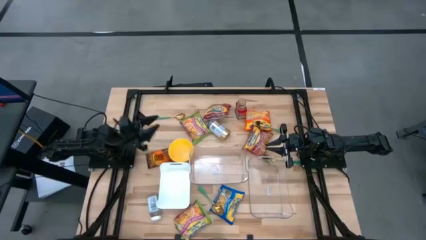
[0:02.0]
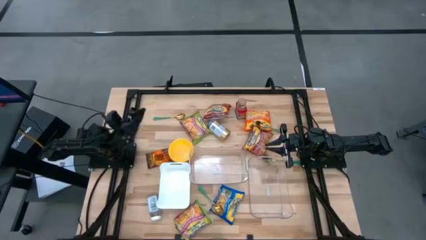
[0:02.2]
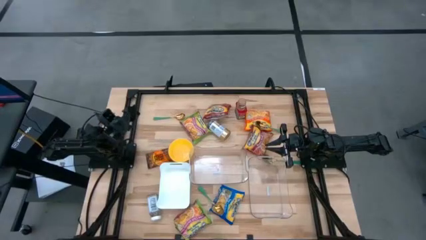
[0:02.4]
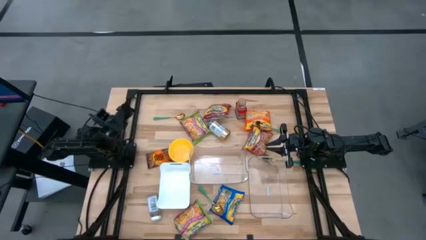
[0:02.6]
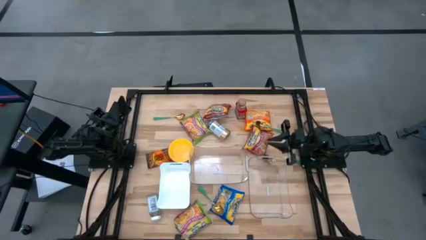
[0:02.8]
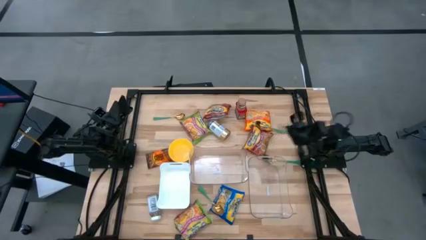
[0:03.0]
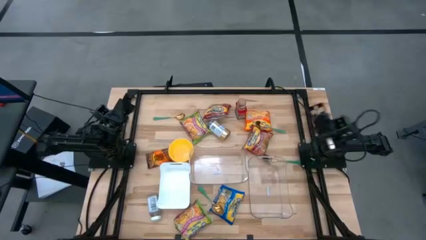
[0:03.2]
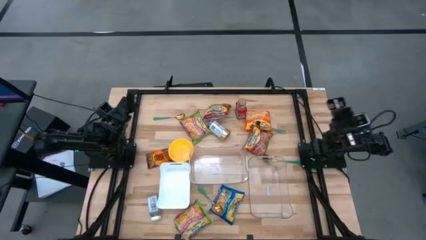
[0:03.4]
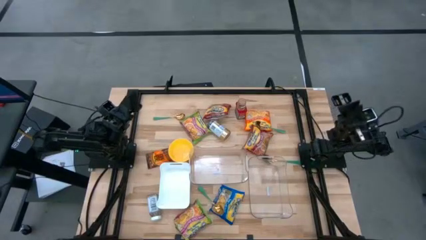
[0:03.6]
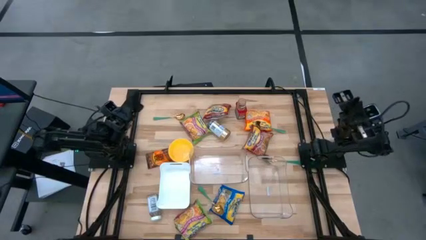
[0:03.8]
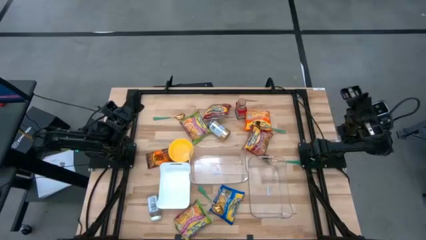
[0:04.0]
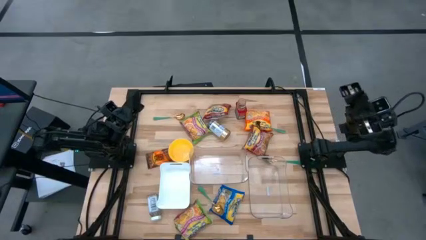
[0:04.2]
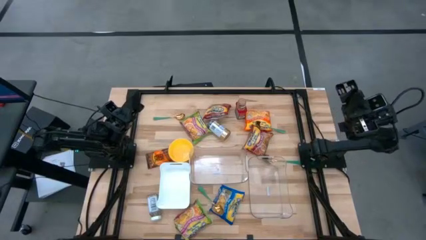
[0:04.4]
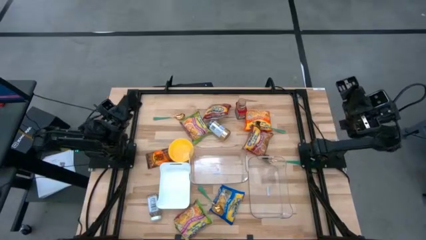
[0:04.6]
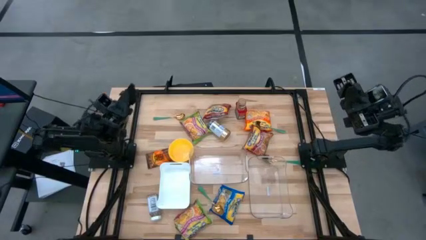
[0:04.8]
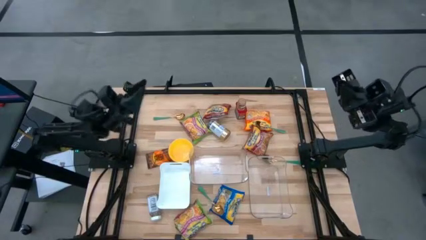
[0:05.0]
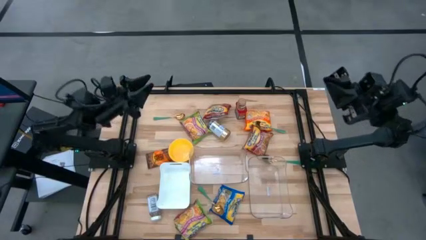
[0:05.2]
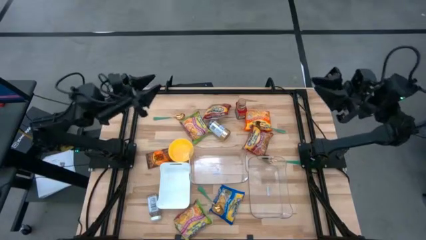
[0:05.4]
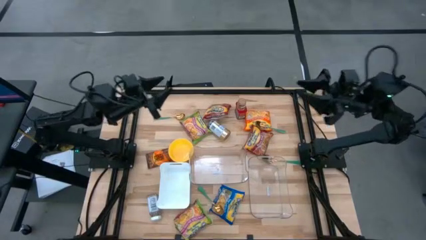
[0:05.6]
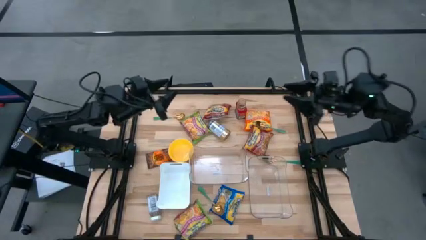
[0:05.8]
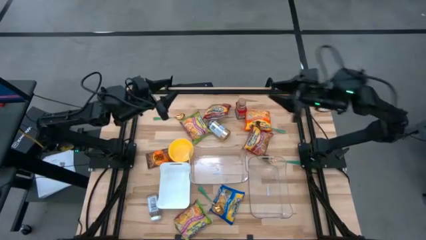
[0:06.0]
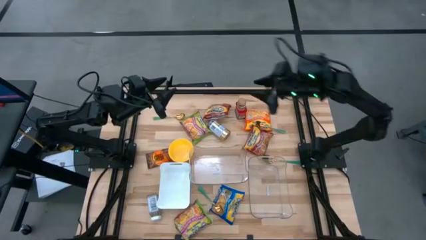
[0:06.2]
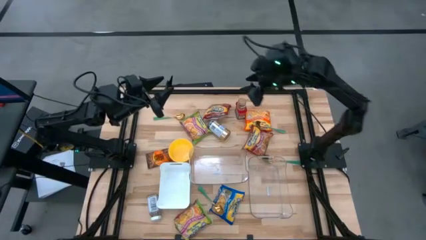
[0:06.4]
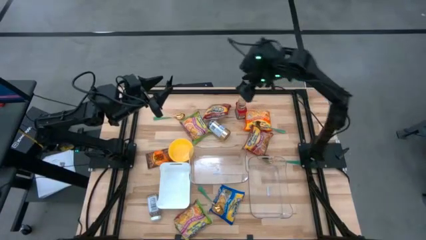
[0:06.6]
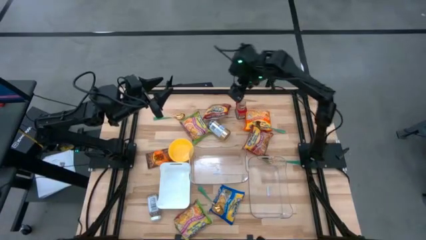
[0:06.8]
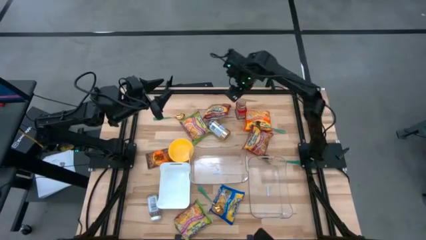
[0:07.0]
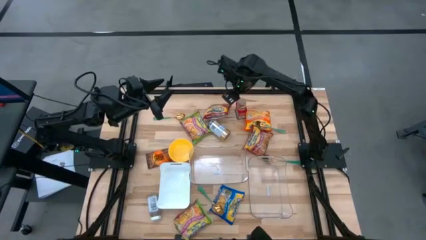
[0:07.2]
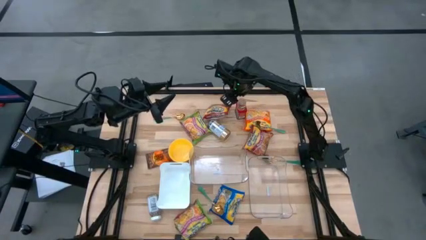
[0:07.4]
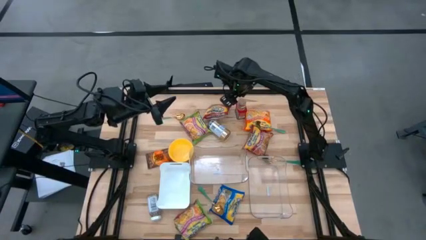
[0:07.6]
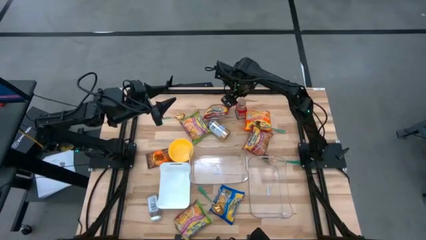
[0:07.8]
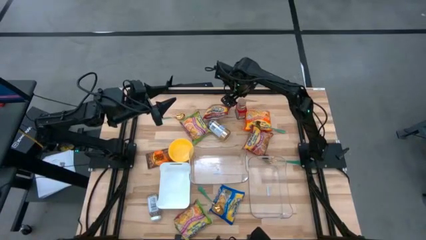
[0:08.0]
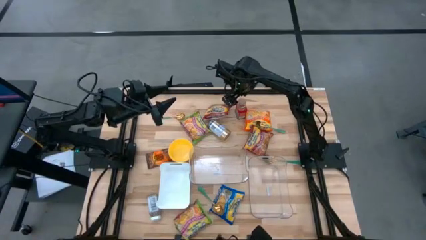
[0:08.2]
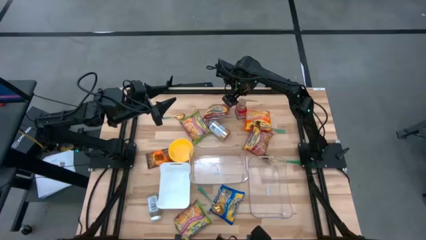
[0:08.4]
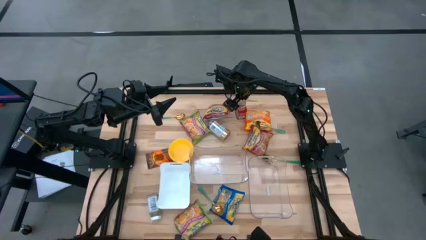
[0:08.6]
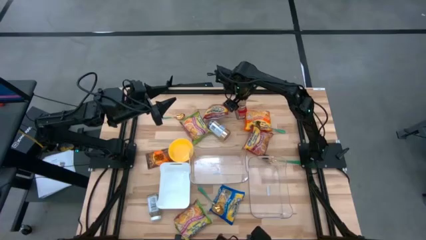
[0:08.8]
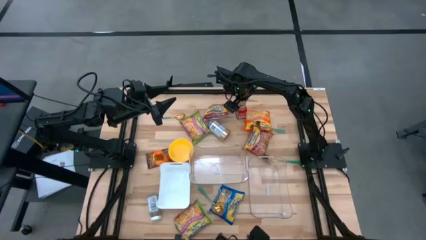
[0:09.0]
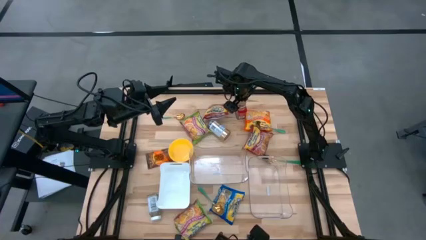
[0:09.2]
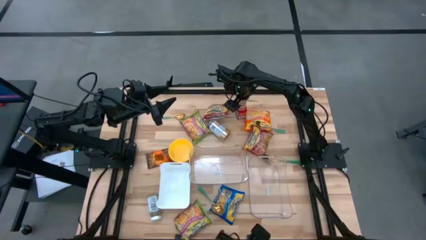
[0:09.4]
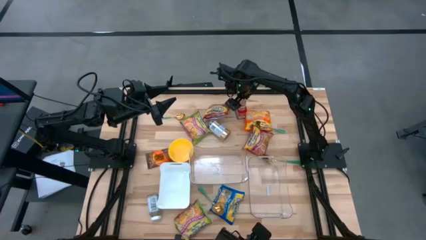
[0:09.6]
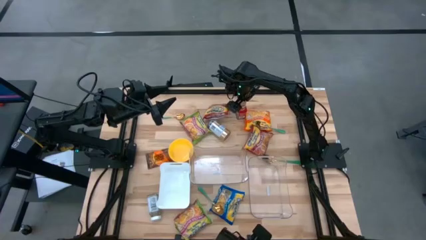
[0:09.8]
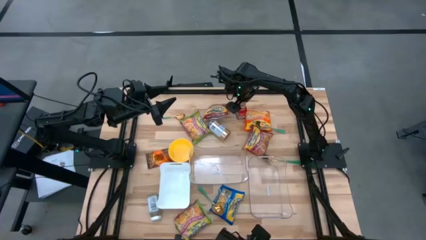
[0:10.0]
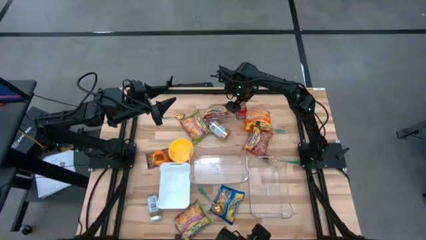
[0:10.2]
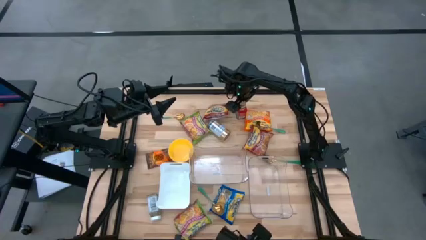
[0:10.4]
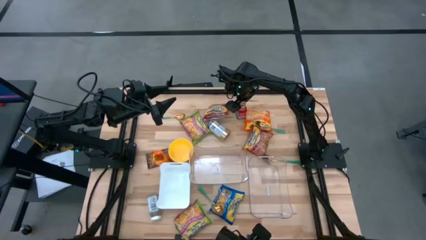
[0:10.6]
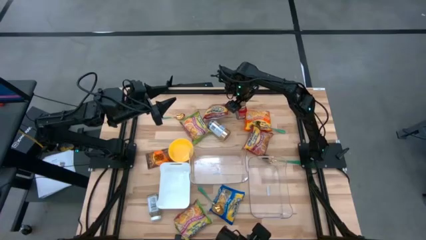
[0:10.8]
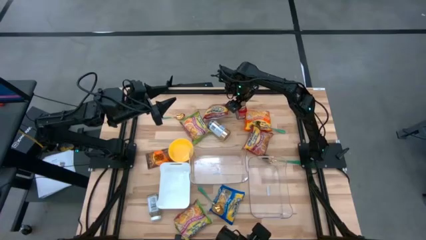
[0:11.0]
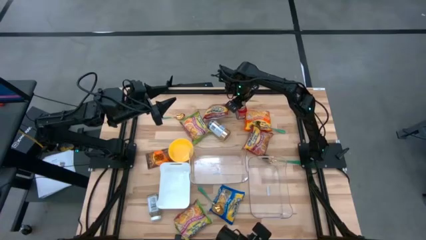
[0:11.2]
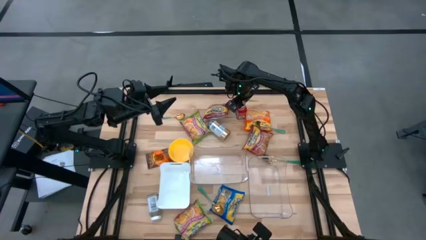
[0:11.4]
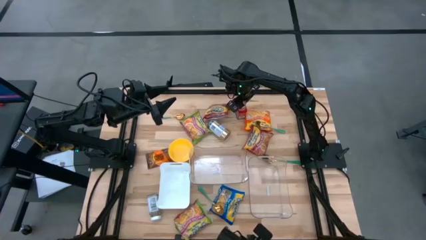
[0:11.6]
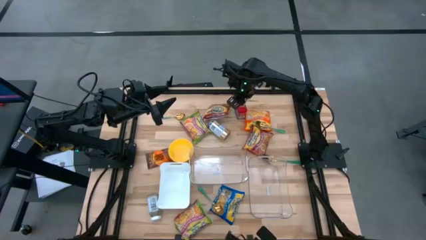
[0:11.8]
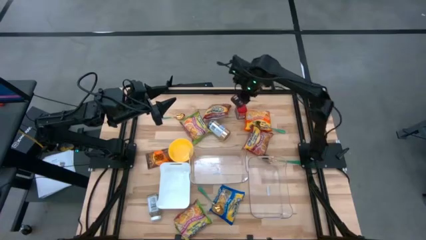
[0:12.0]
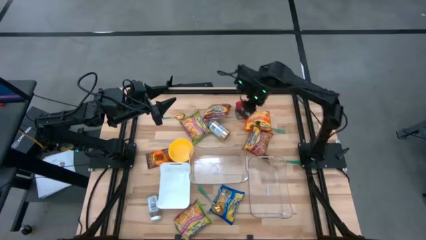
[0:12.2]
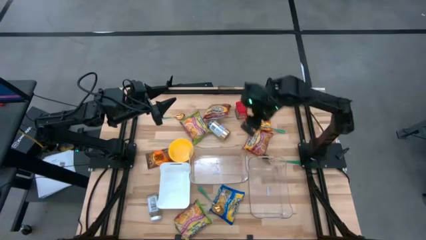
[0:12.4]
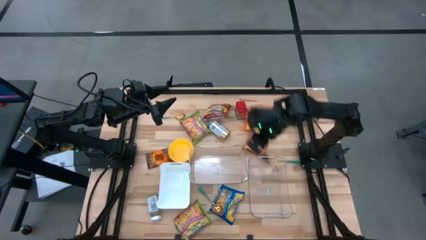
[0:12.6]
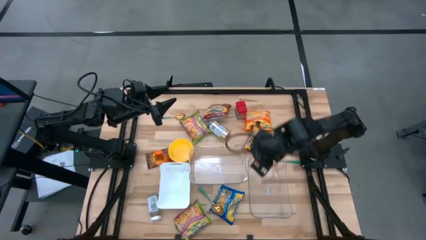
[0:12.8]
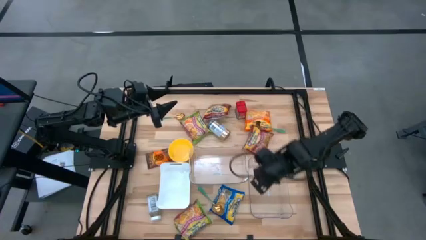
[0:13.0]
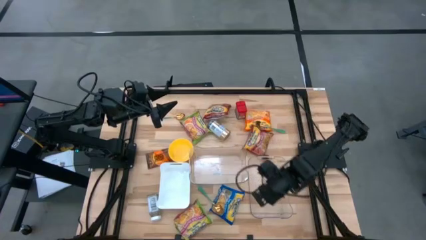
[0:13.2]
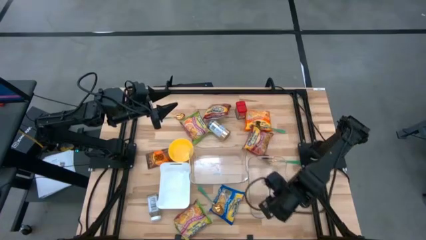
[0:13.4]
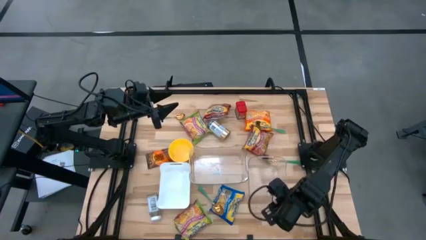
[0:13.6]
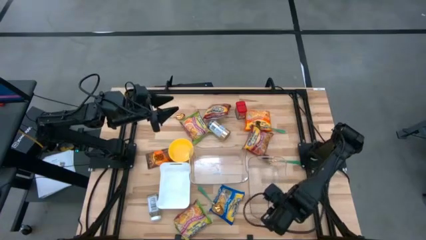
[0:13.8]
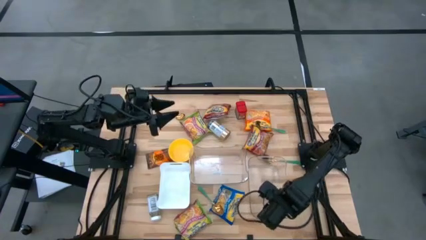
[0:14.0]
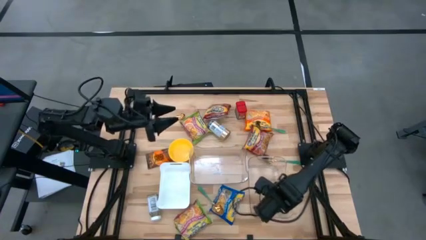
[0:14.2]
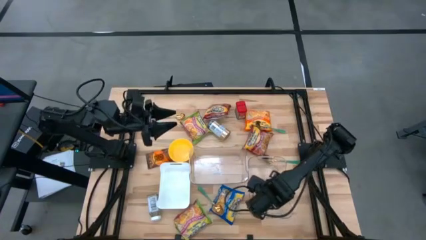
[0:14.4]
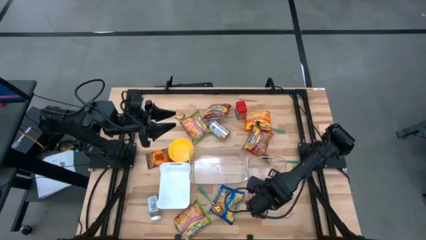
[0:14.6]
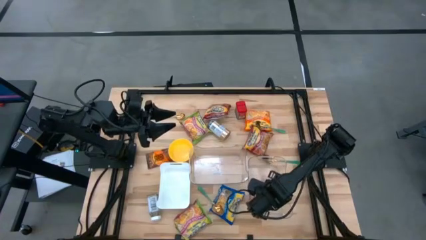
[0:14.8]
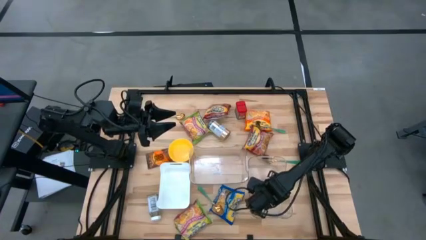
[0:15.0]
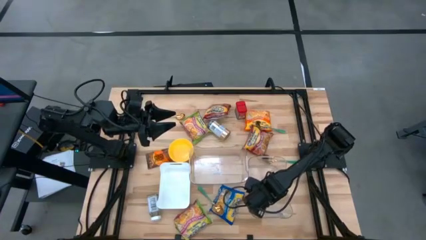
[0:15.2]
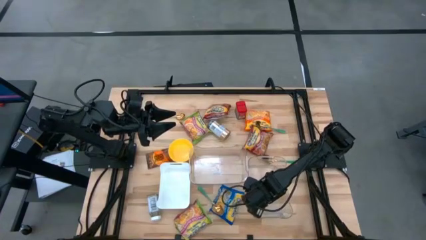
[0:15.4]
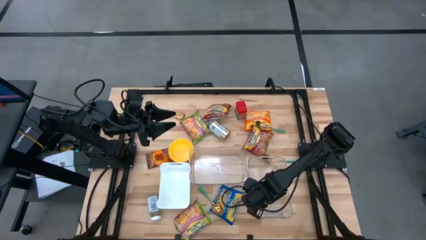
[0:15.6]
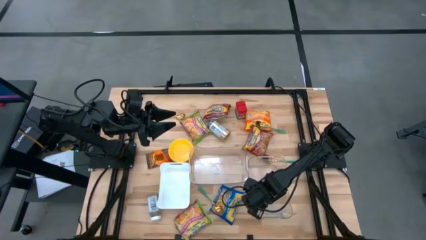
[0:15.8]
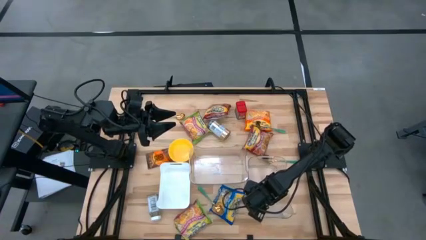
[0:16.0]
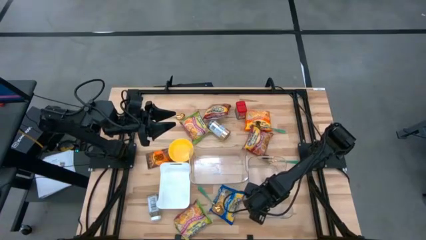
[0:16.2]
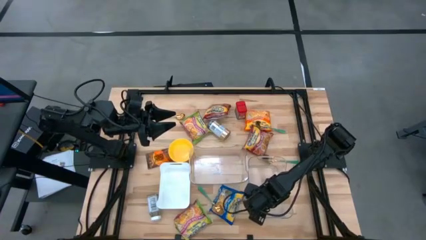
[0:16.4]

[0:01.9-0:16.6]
Task: Pick & Place Food Item
Put the brown seasoning bottle into the right transparent bin
